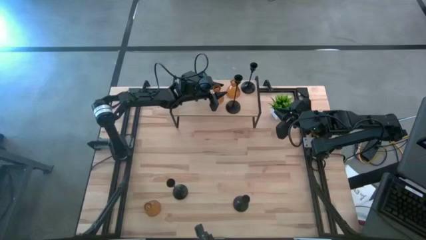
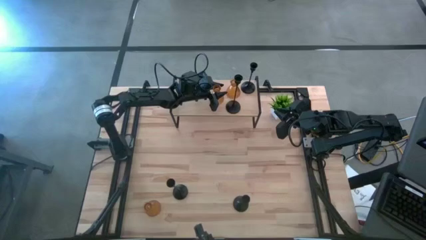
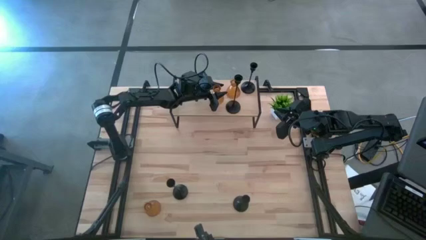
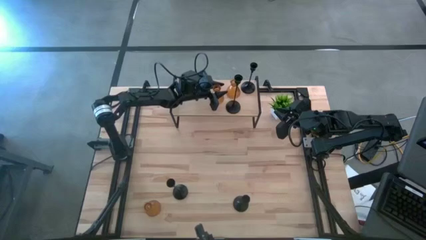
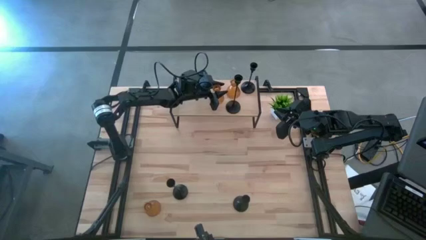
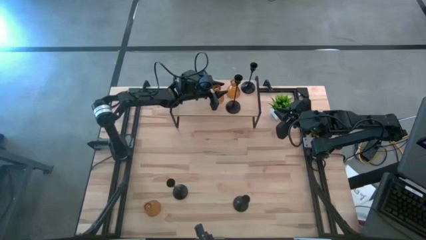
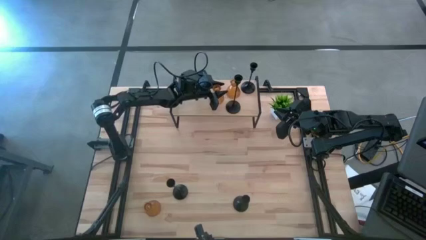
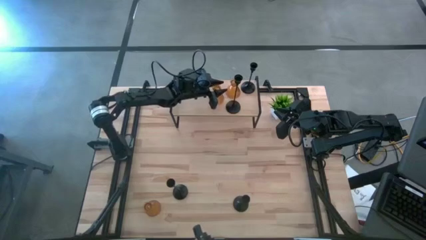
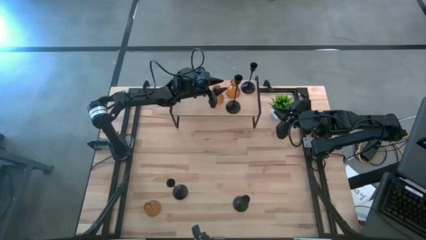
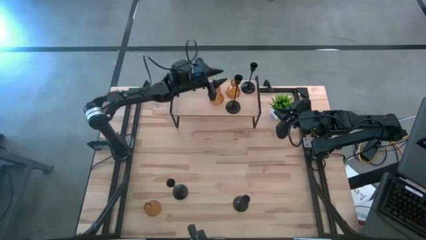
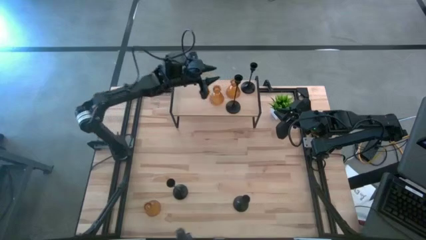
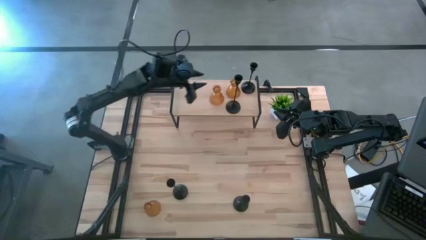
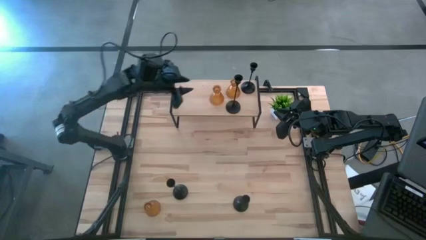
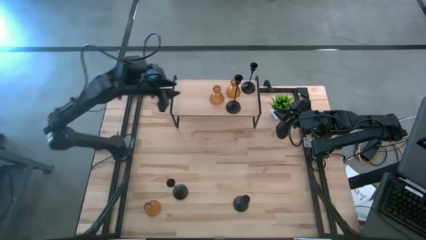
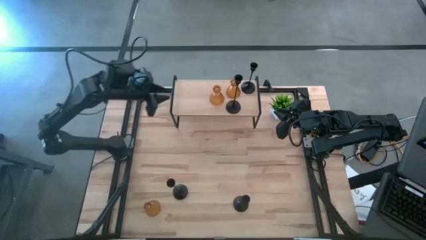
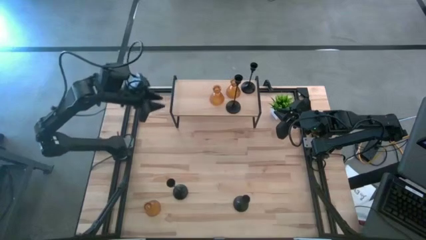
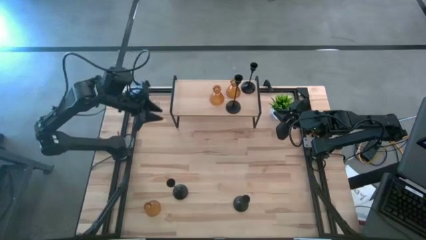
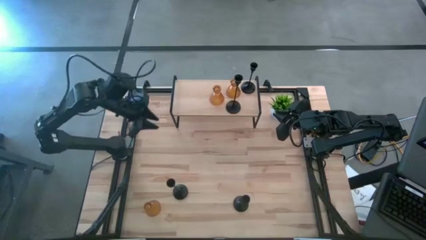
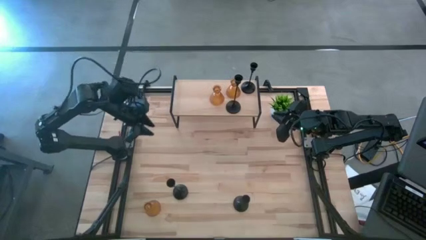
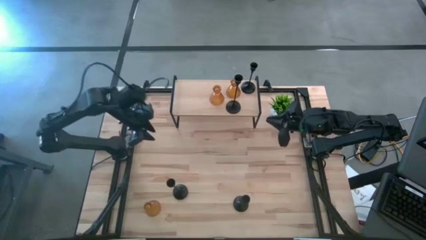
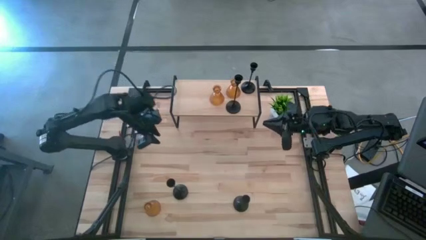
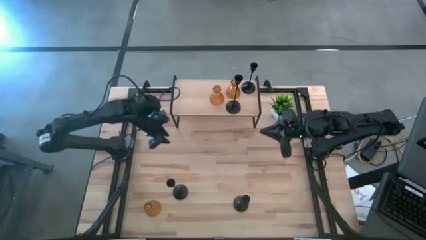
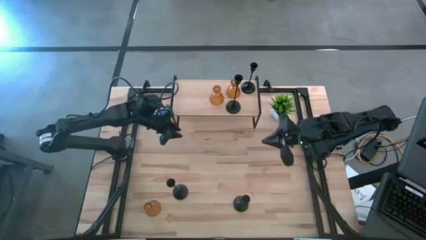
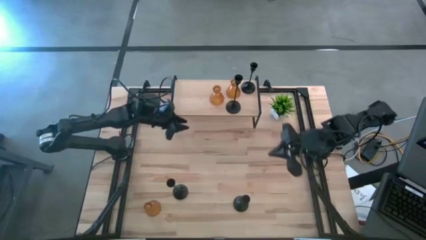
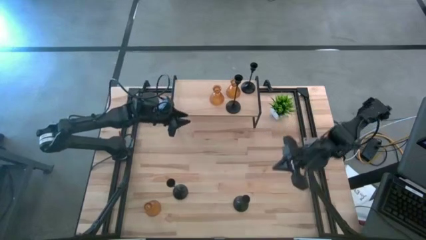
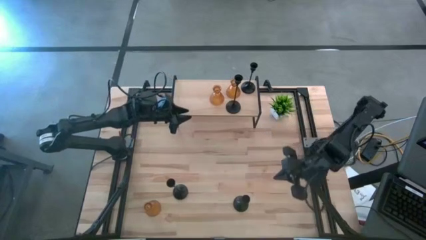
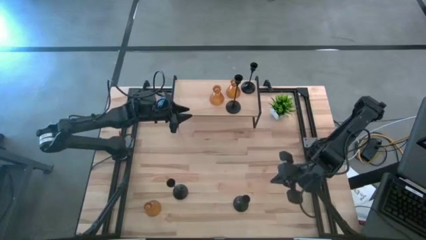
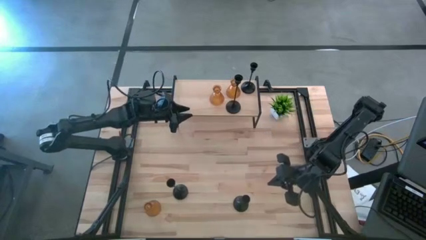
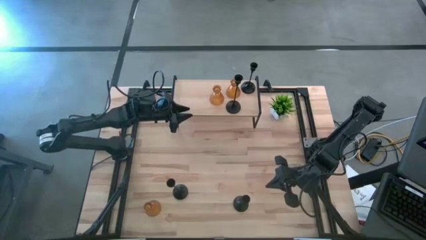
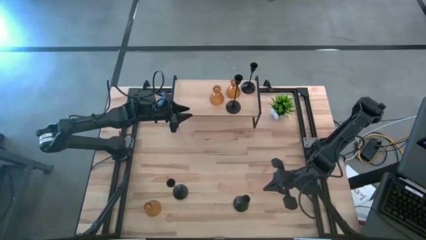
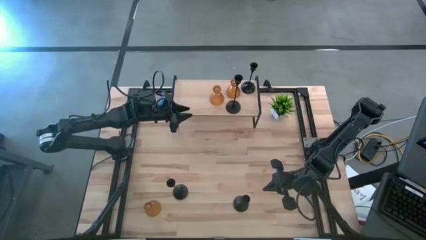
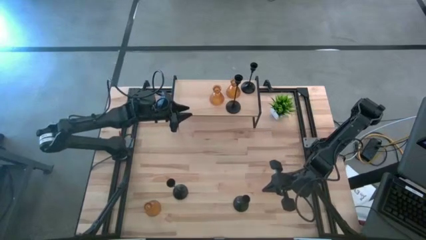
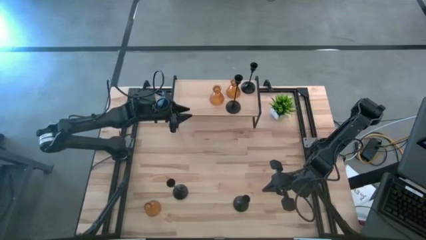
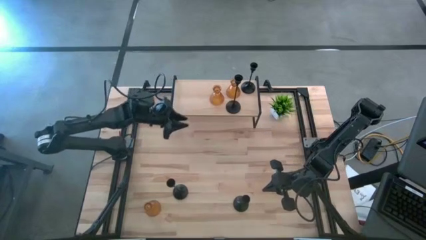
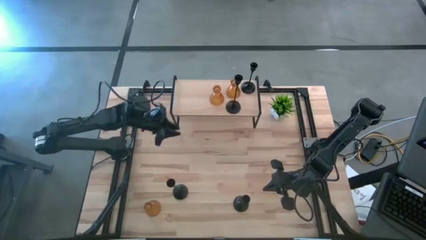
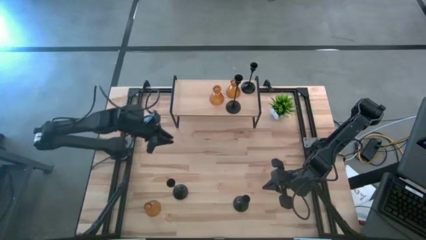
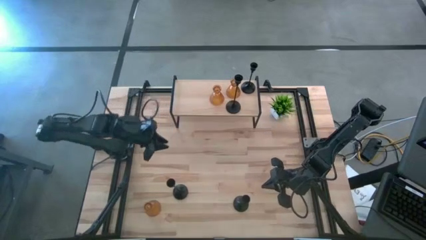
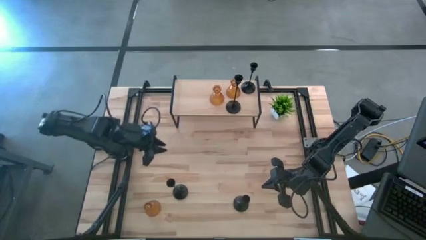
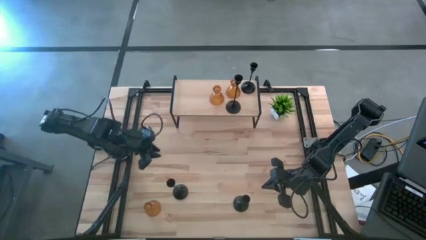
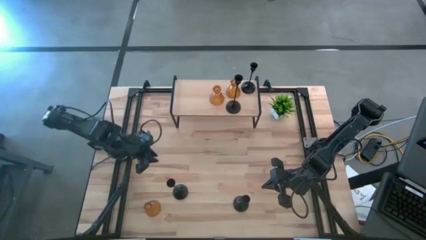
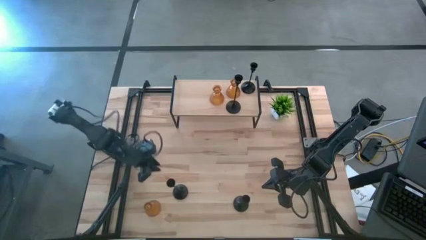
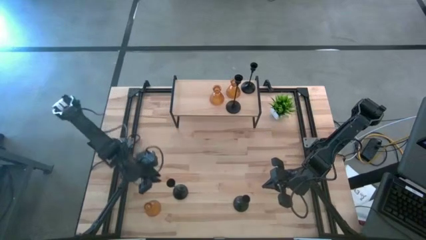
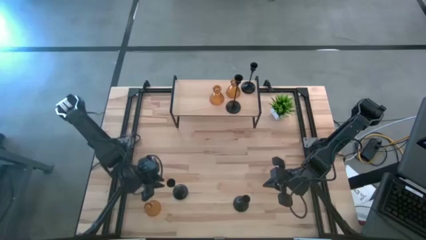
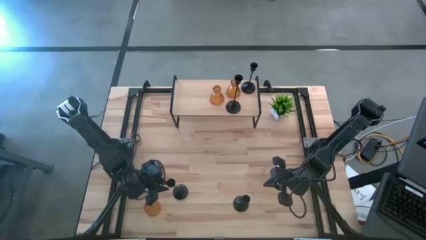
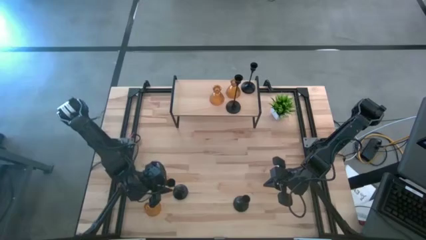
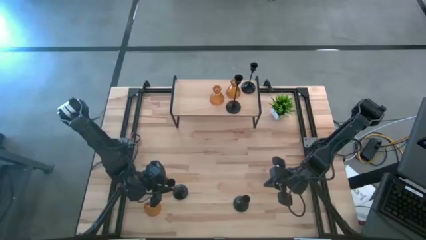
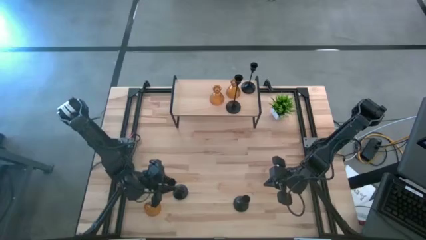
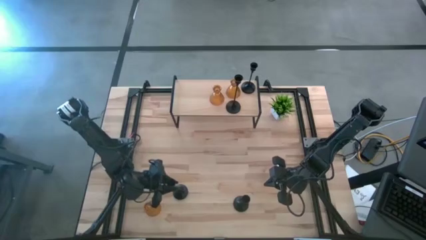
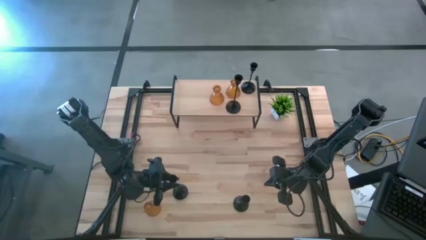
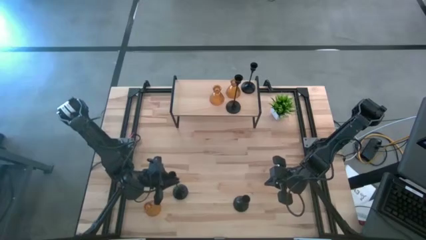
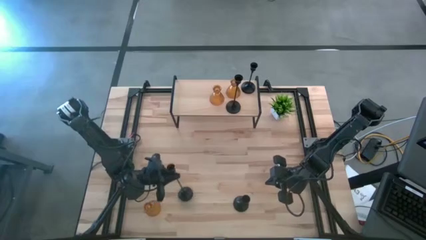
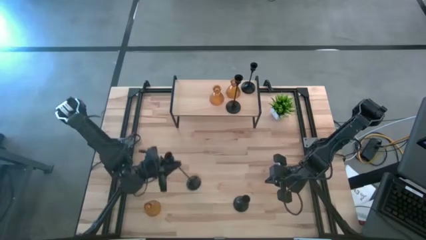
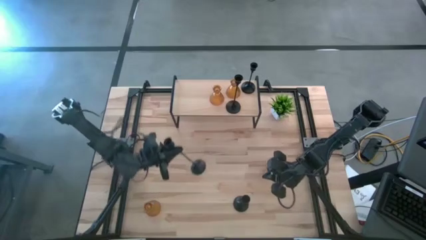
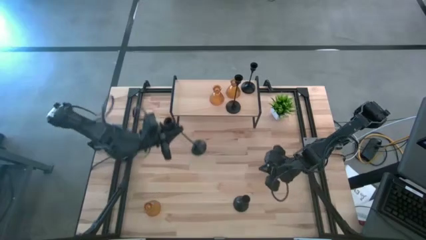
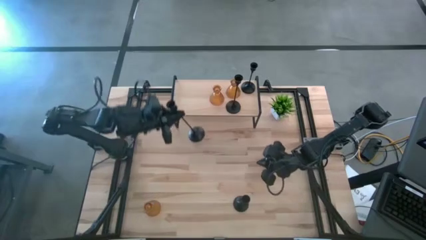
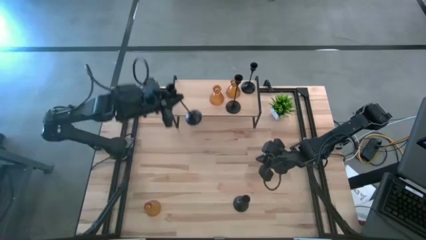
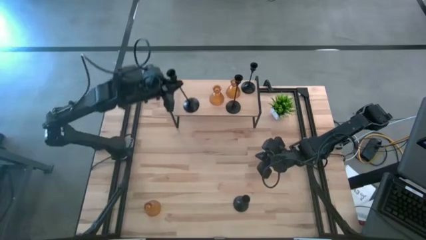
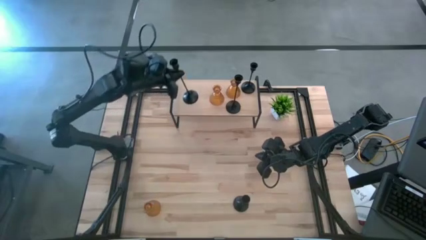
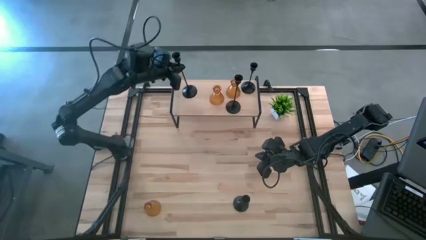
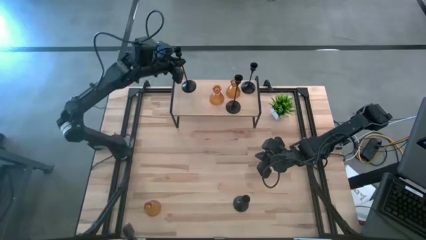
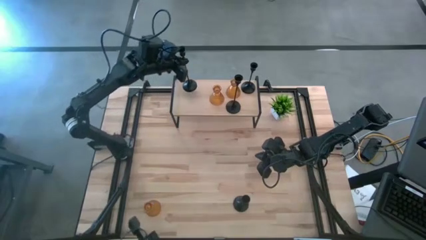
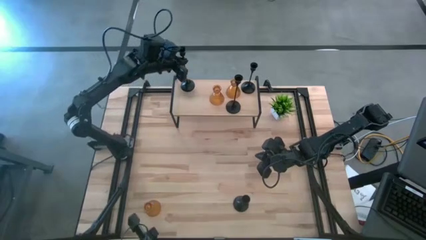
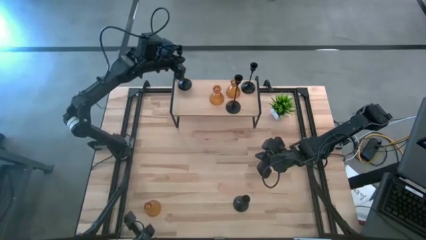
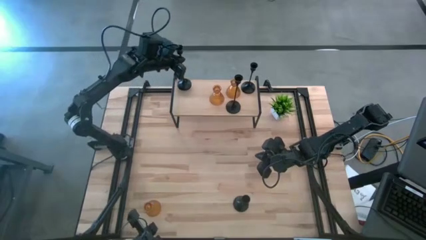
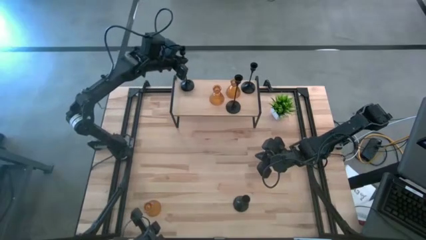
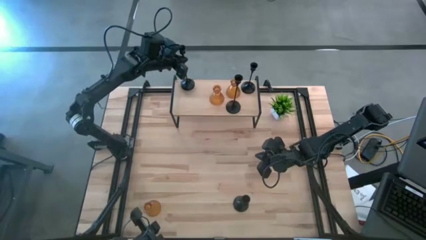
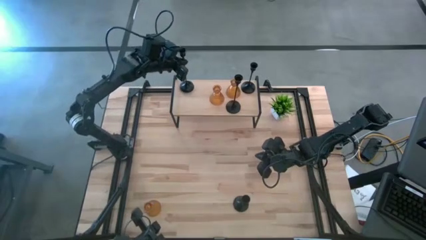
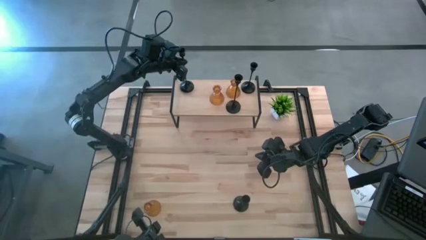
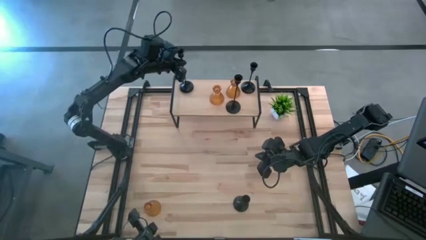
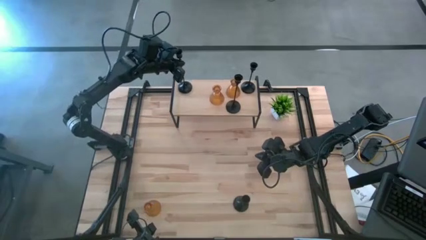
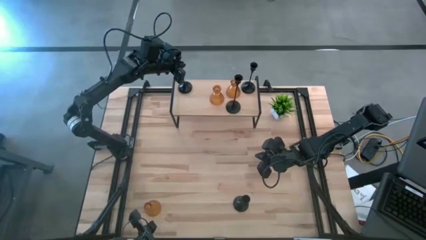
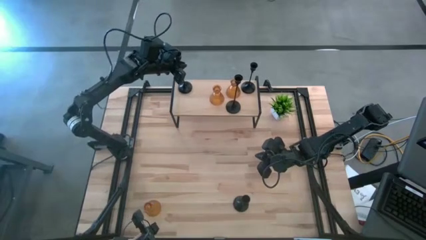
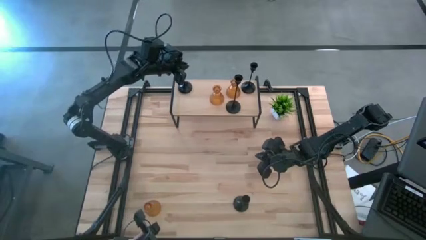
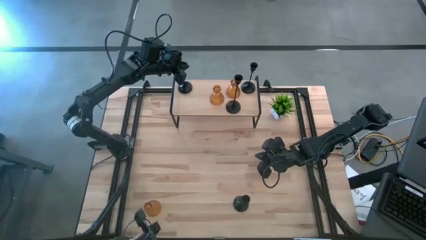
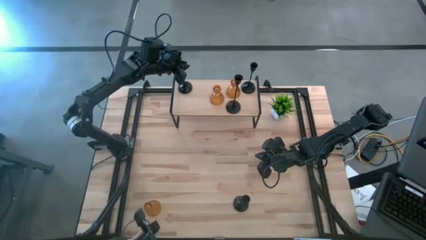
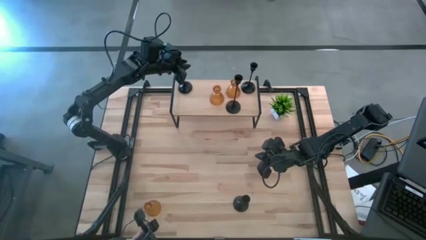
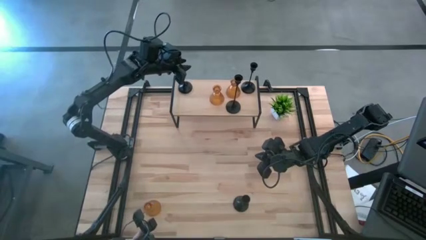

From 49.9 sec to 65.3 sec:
Task: Pick & Place candle stick holders
Put the black candle holder on the shelf
